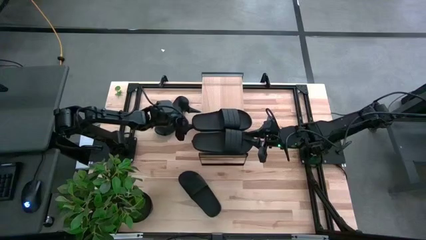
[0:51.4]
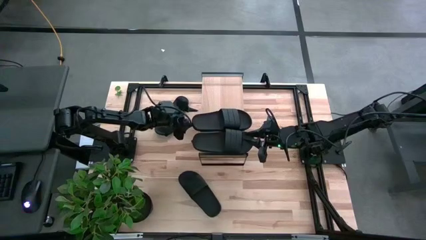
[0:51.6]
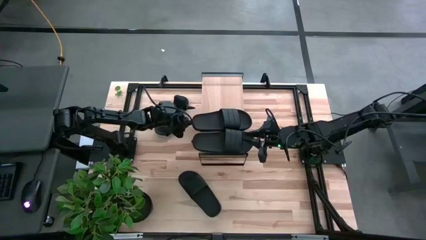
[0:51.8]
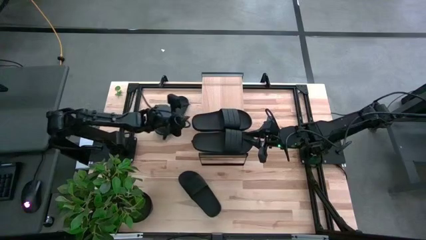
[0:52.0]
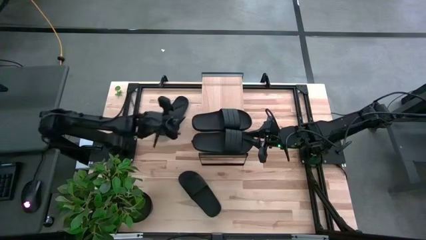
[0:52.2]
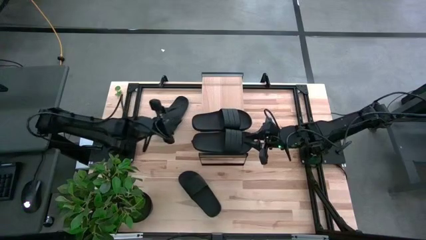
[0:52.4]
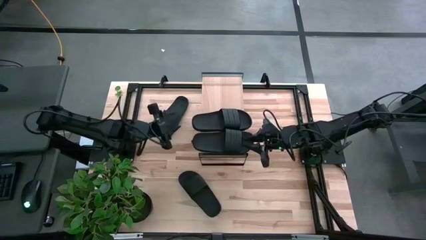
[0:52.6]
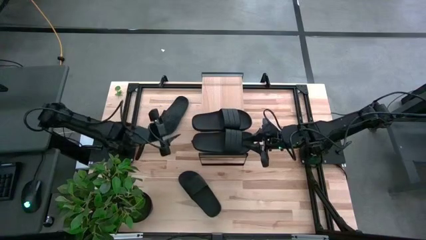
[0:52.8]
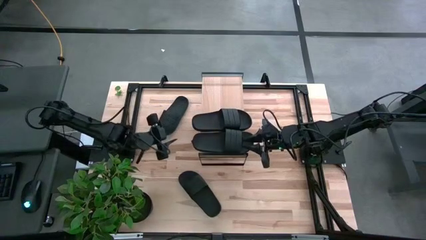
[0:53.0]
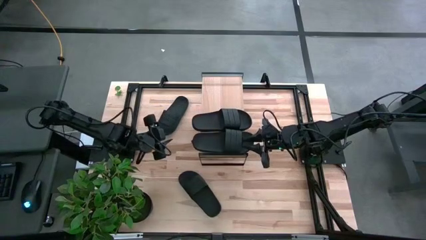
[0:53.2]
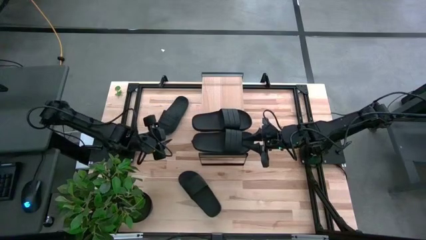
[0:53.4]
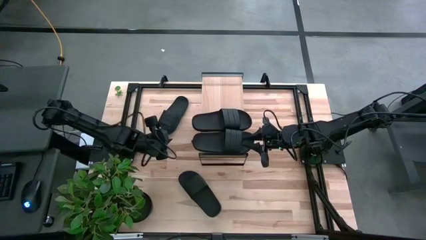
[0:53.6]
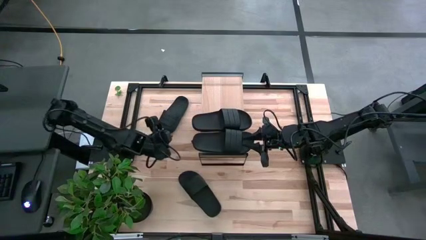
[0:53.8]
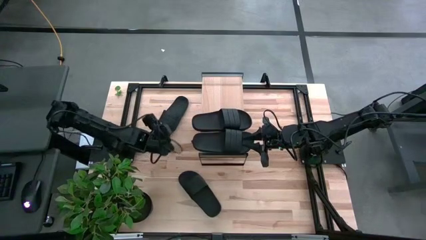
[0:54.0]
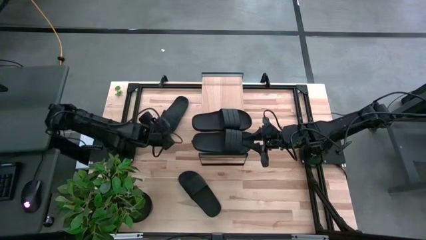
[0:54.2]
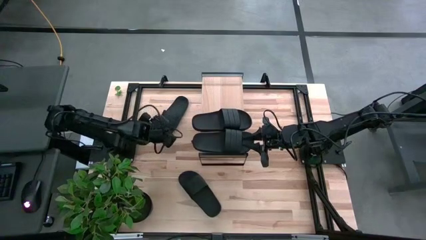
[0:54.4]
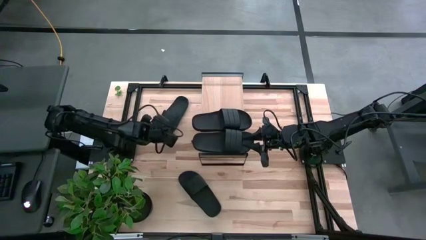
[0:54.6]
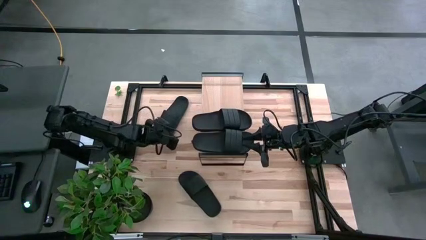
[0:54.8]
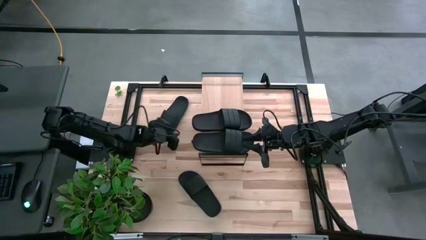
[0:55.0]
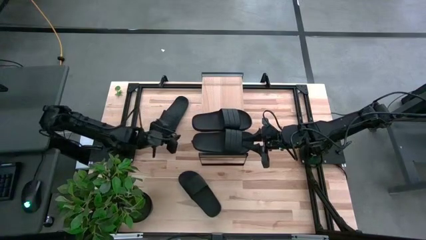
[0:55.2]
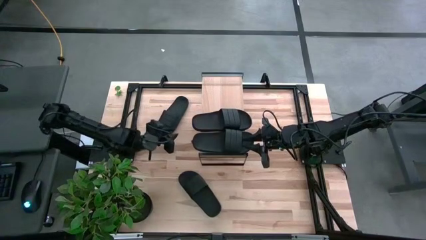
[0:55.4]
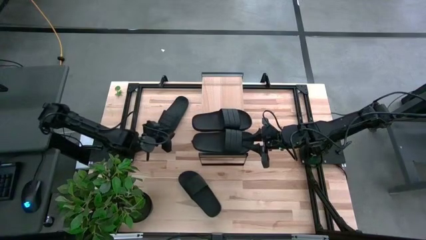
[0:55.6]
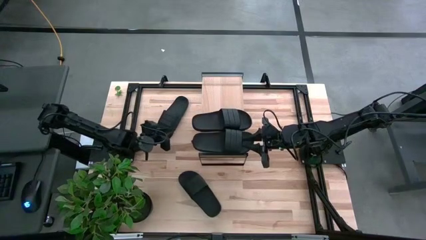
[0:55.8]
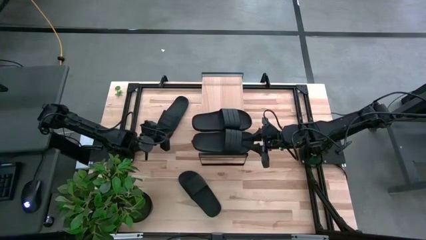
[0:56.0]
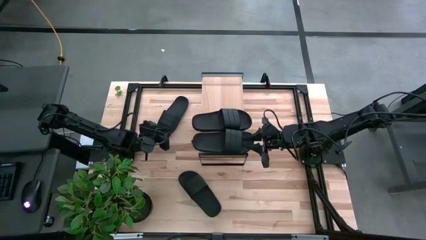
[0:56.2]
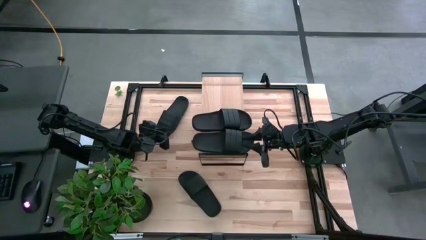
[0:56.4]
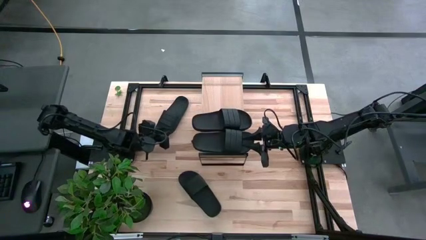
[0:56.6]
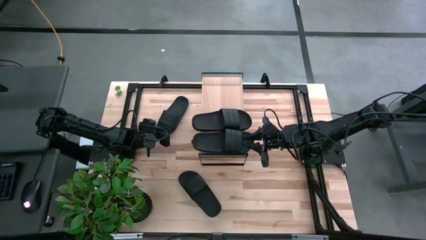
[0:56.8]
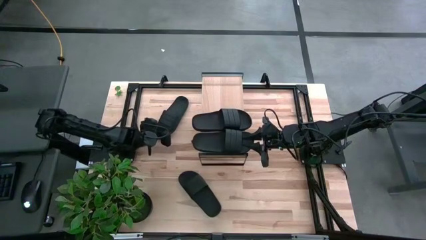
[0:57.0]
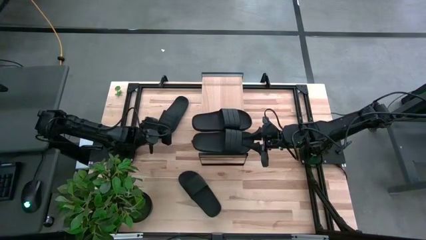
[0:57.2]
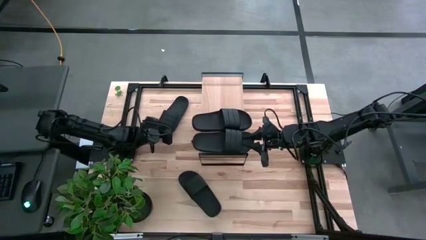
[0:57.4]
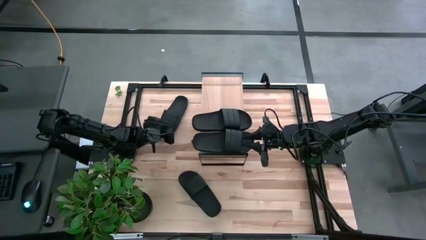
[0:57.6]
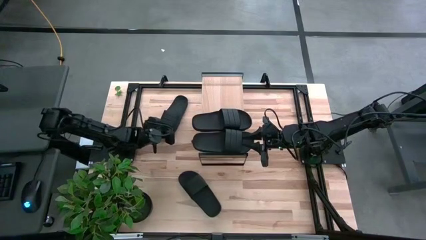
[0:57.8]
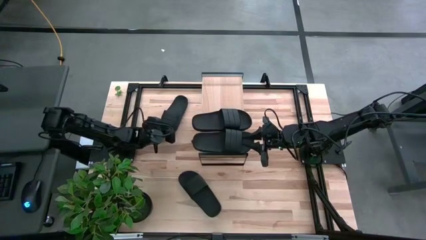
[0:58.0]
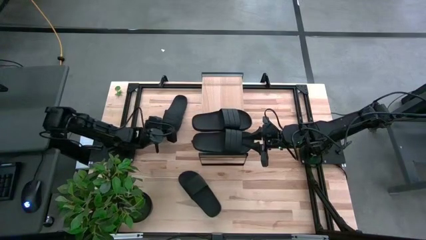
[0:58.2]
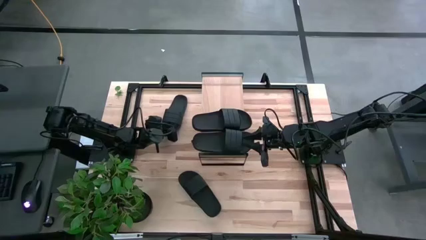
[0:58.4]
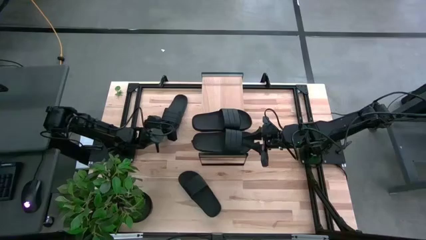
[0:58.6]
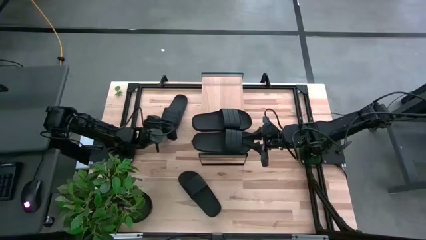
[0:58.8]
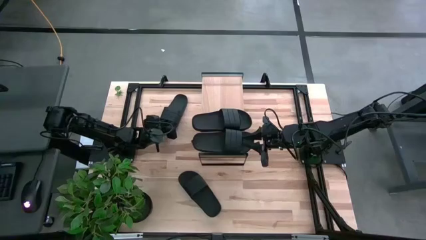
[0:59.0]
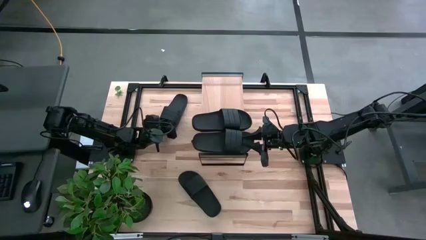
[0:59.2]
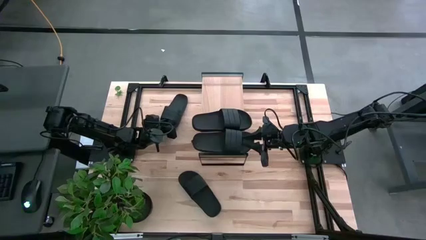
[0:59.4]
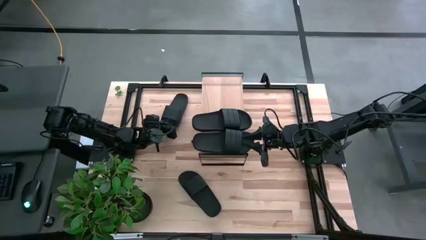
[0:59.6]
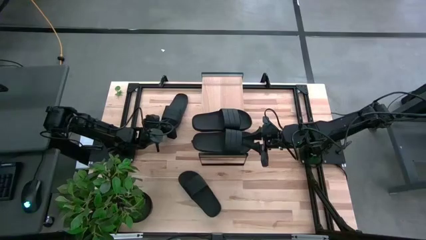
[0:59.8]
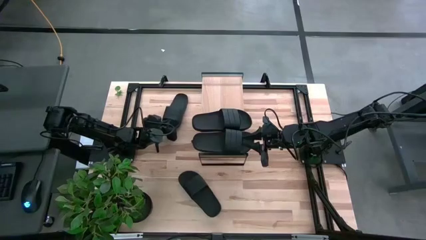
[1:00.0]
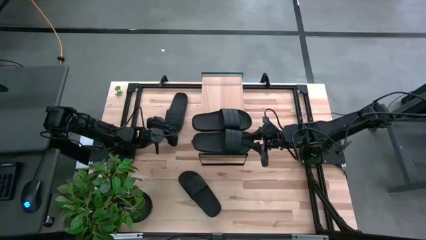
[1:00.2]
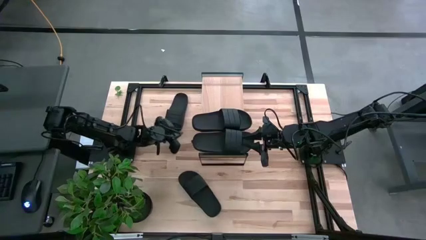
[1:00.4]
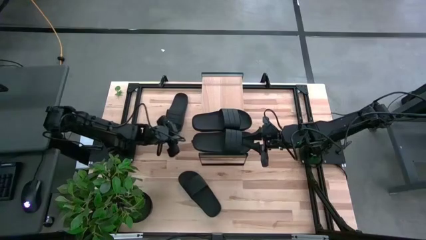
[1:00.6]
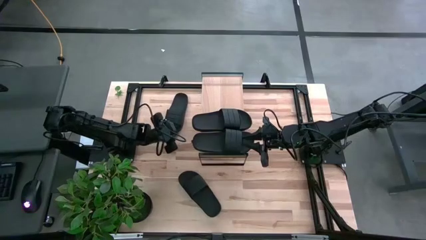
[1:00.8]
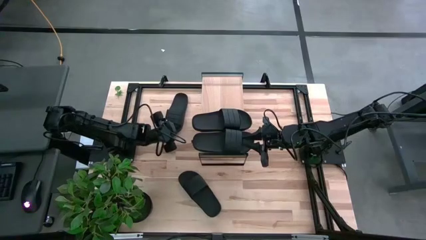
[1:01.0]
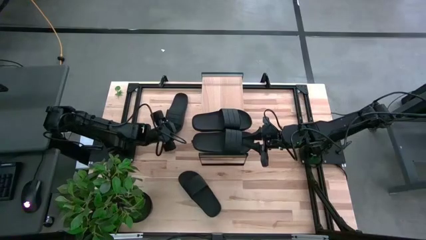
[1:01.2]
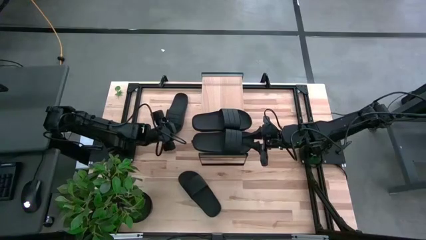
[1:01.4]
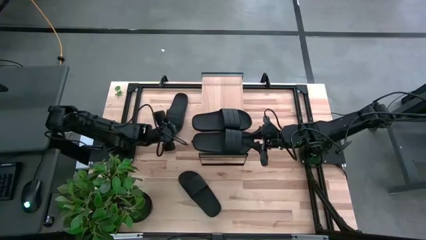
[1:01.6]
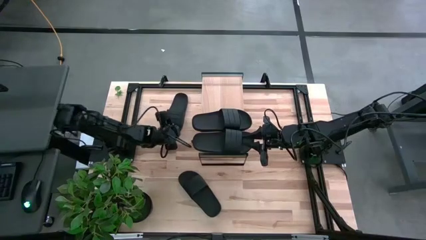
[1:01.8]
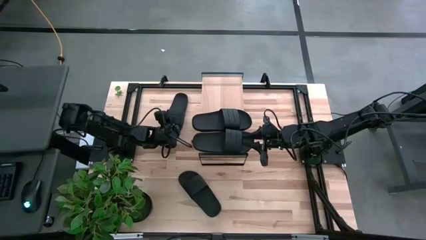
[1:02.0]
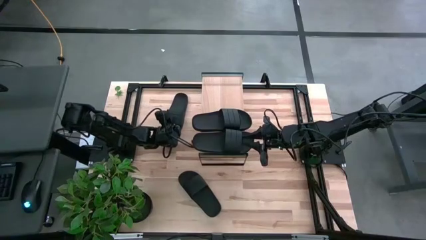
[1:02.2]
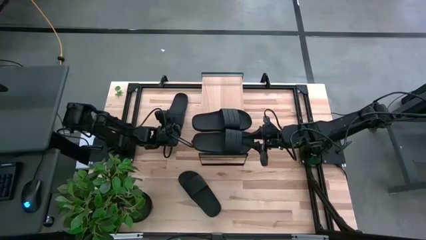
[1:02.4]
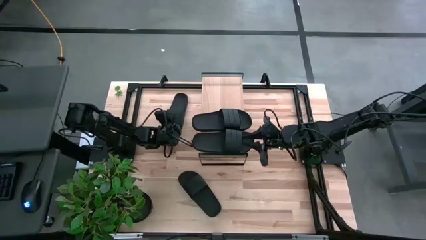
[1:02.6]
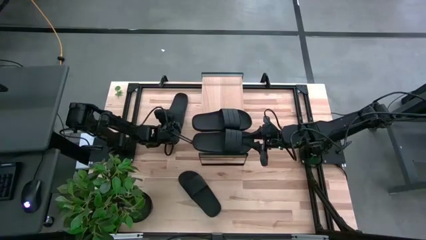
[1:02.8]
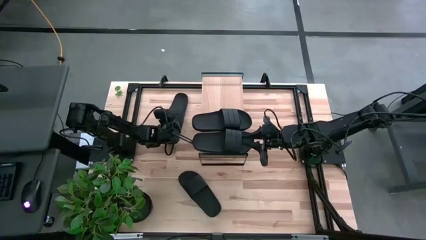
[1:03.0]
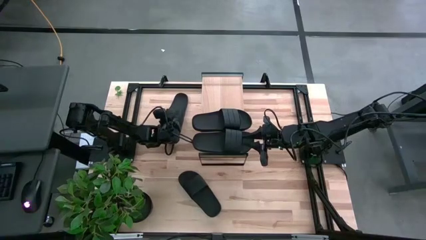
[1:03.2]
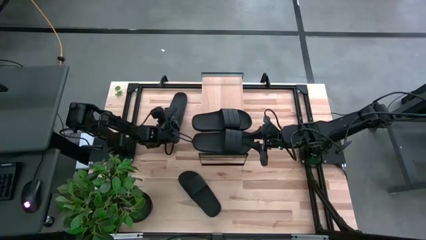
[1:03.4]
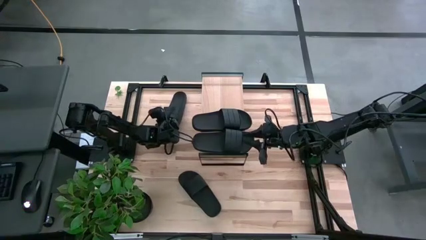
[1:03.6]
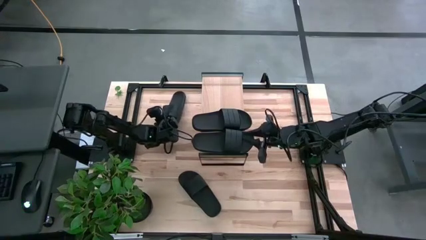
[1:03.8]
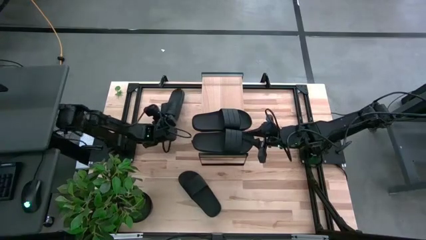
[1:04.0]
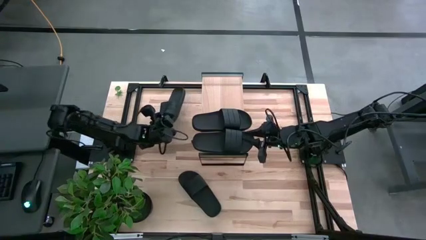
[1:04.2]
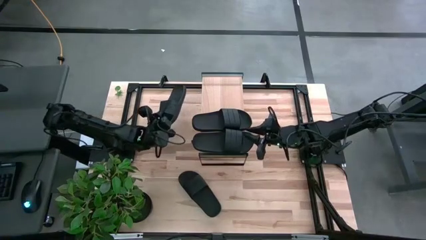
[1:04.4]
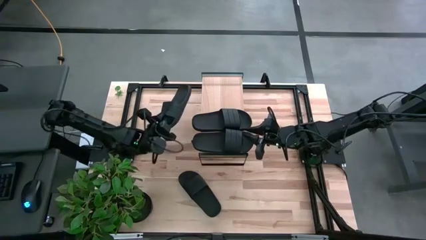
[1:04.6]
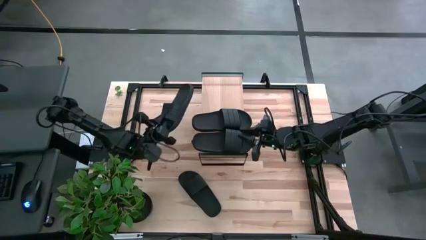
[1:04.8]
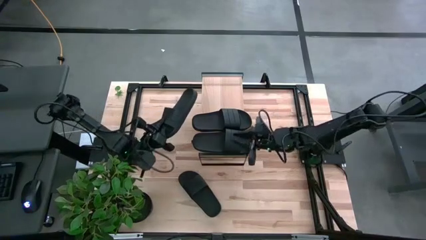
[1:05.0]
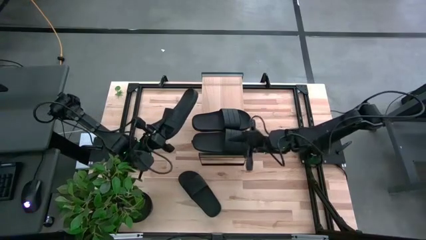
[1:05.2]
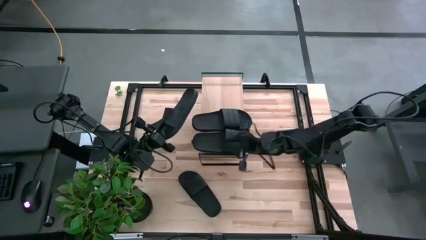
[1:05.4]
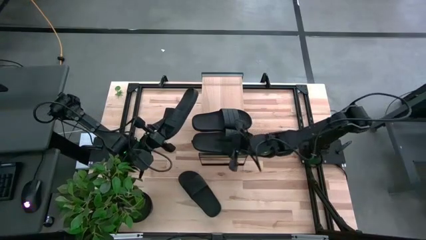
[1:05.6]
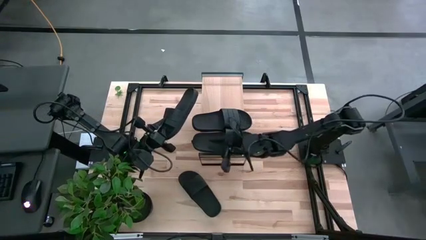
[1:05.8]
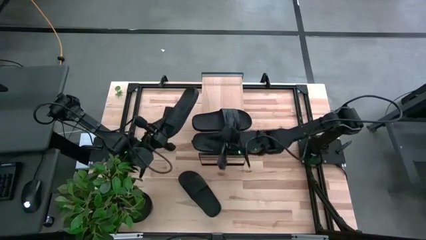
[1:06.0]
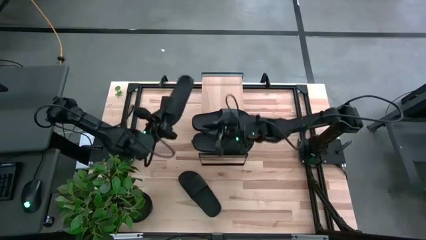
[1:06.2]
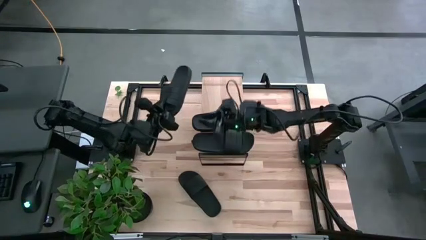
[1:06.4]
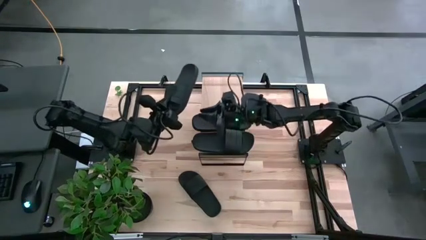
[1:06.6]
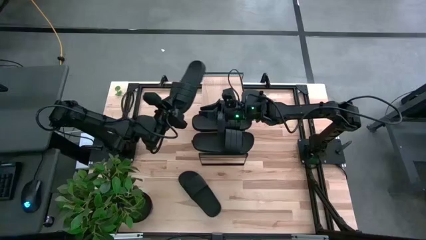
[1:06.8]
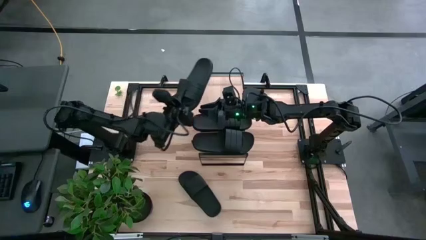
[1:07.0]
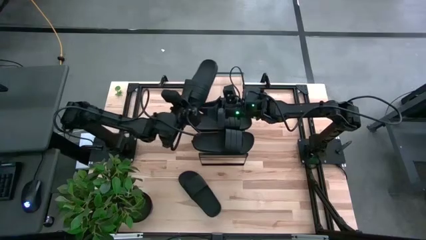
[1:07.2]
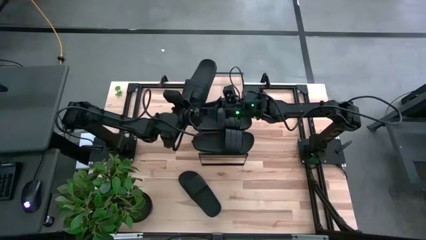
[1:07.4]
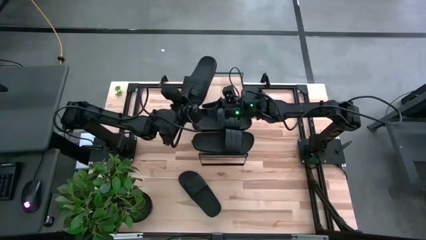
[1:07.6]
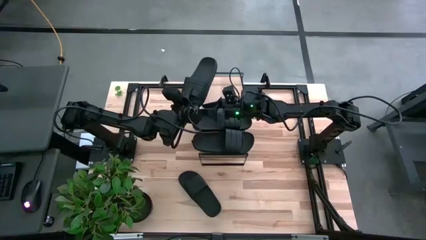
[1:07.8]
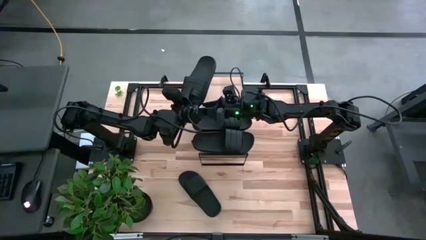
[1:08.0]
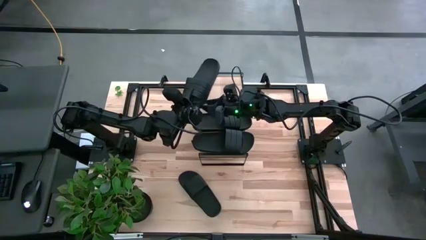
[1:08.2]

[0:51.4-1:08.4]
Task: Pick and place slides into the shelf
Put the black slipper on the shelf
